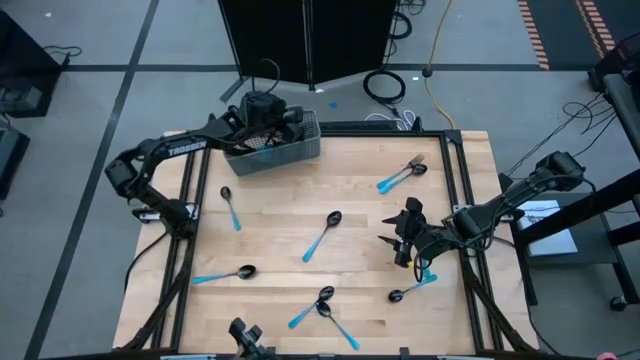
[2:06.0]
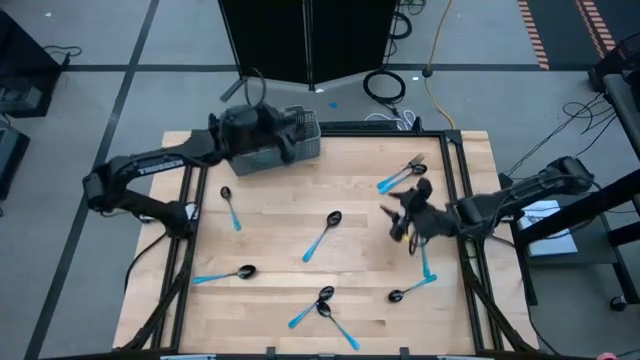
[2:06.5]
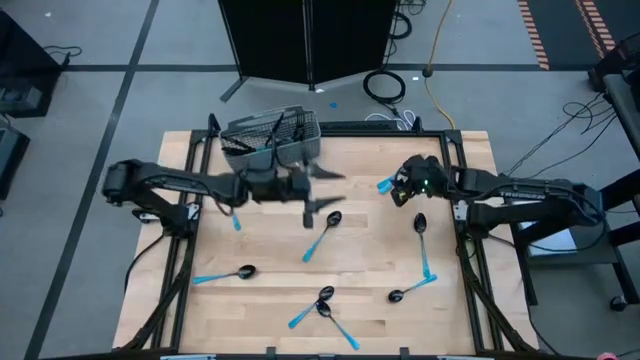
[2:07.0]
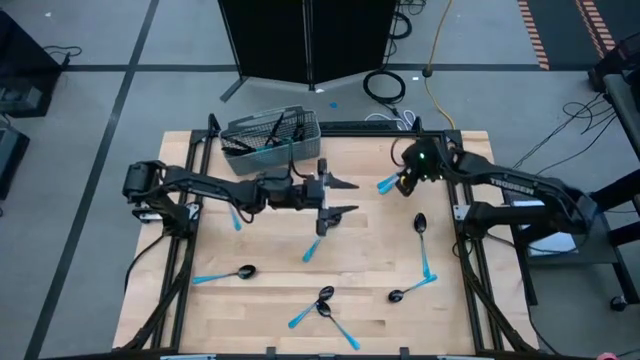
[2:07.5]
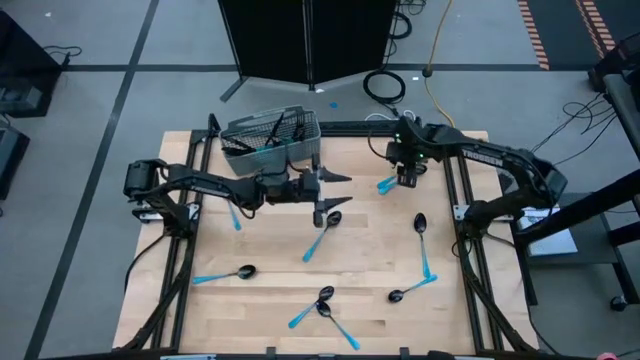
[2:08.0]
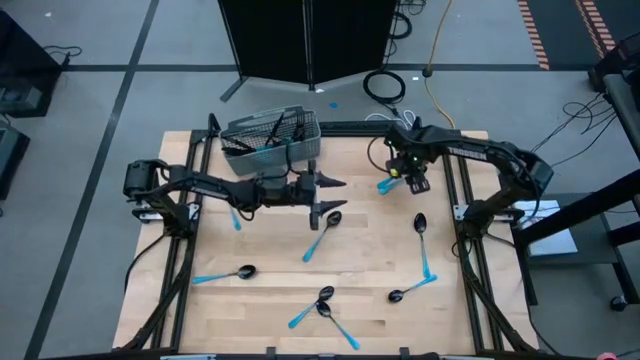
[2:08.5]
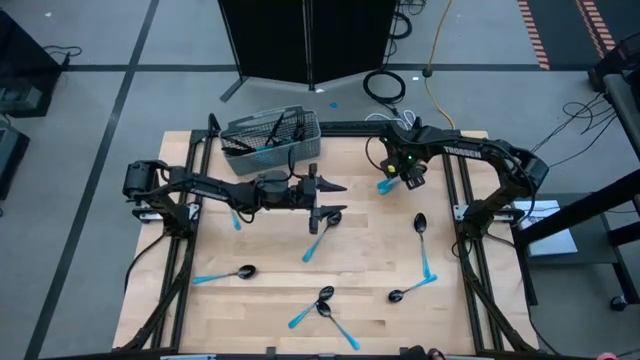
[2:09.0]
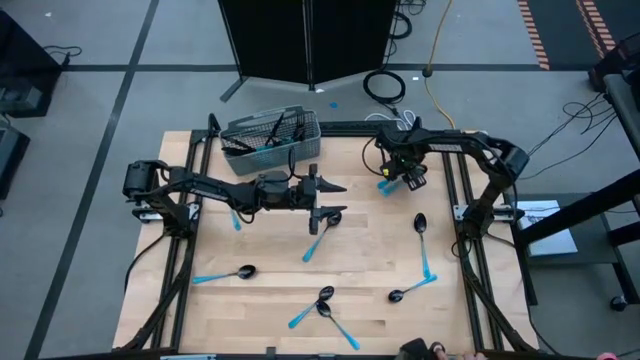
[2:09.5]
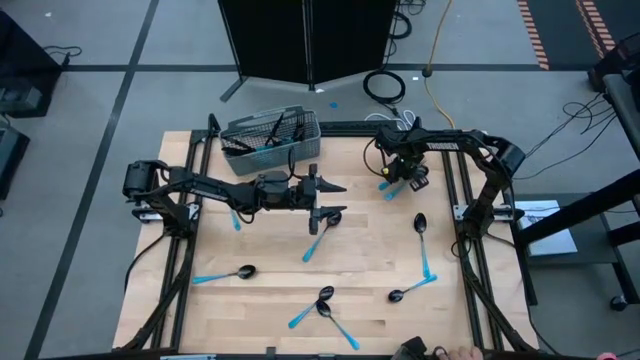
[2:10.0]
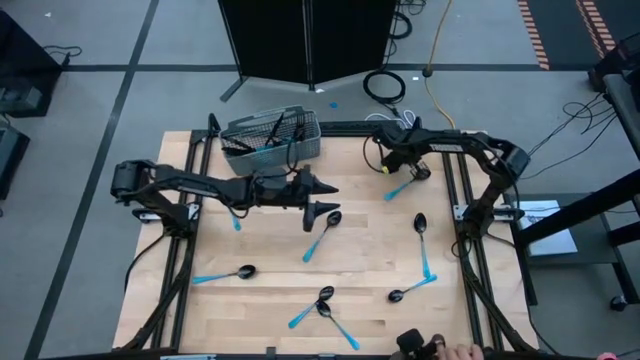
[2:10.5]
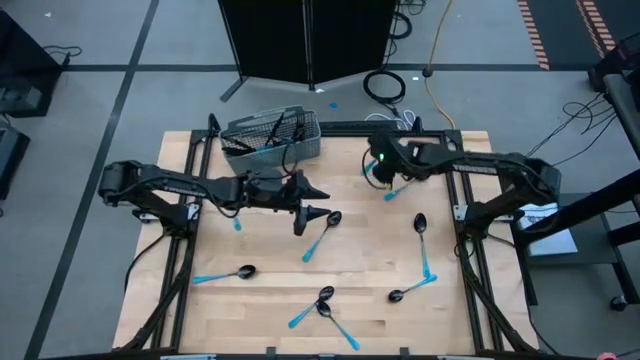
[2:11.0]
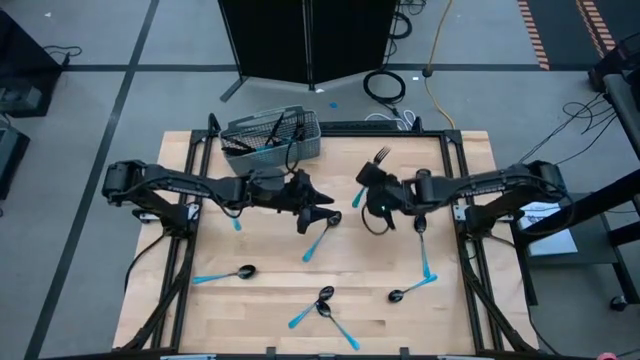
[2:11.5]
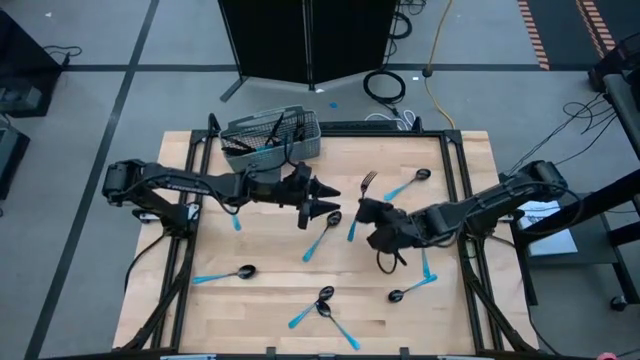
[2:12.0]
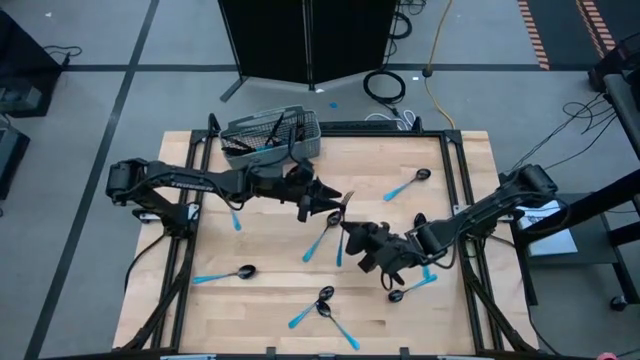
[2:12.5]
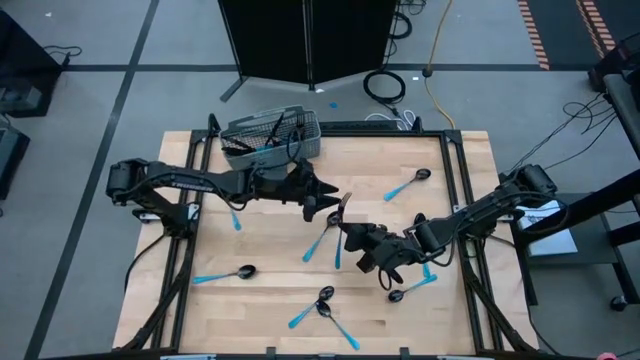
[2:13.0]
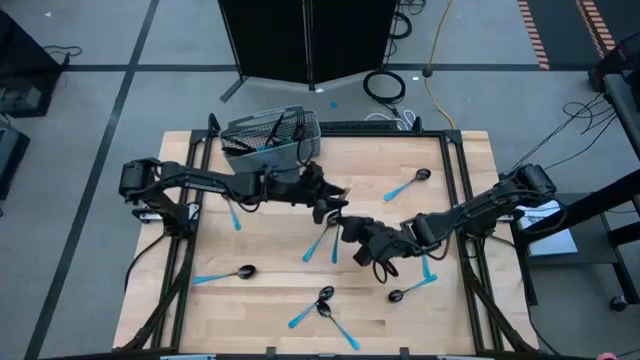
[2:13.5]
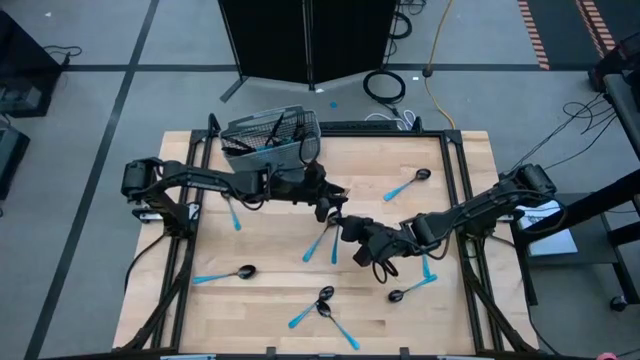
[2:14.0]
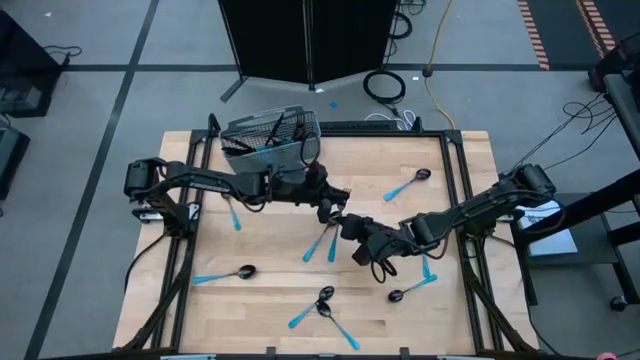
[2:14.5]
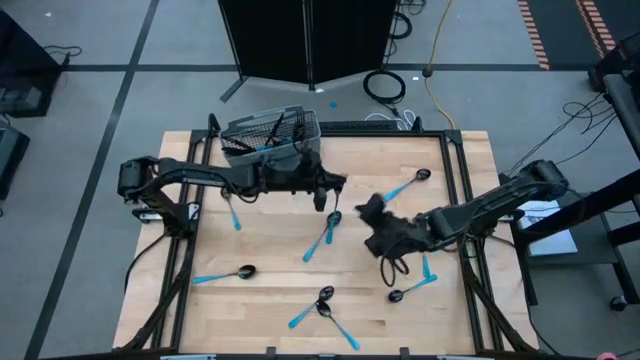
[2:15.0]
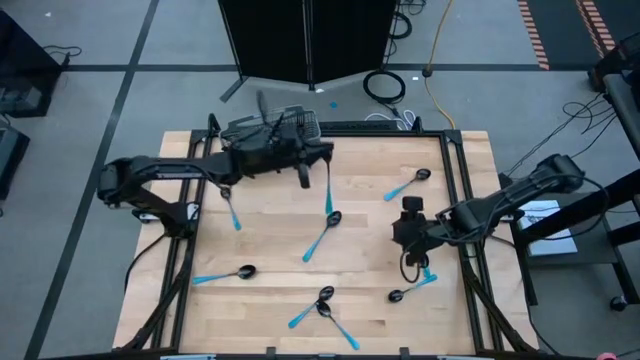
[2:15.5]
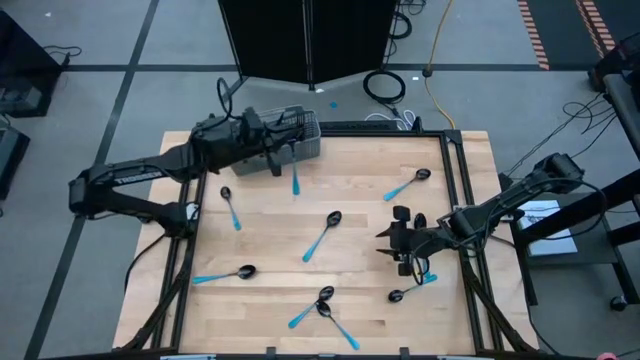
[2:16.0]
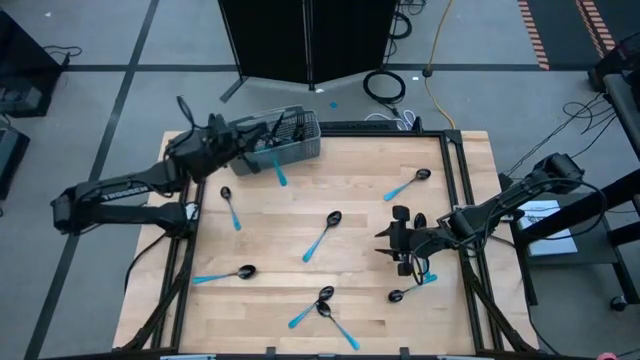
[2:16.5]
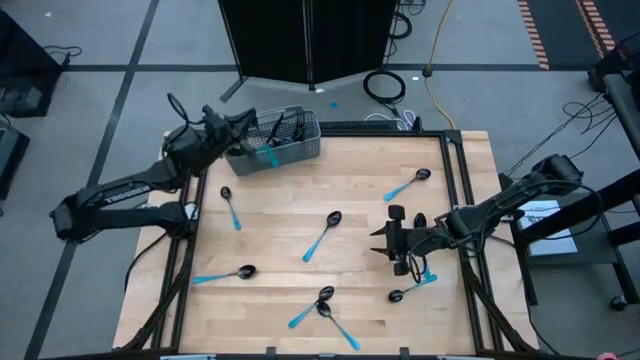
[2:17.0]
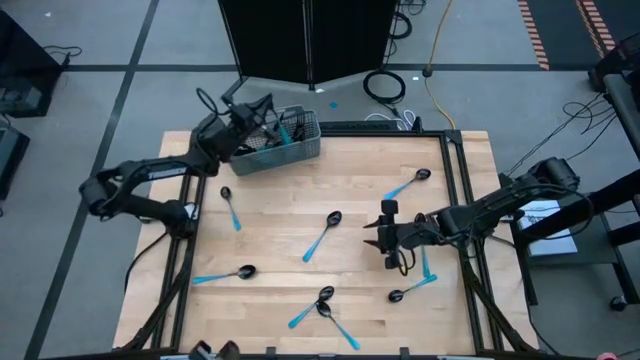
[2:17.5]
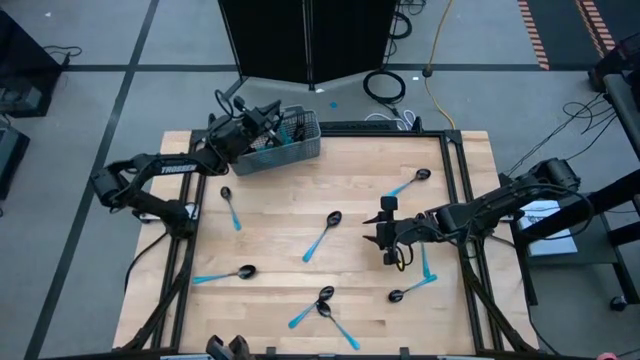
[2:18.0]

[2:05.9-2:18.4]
Task: Sort silverware
Put the blue fork into the silverware basket

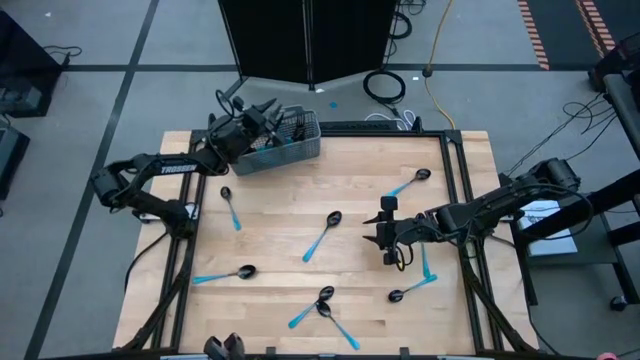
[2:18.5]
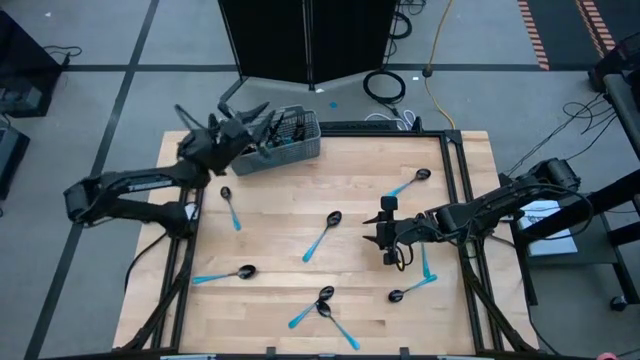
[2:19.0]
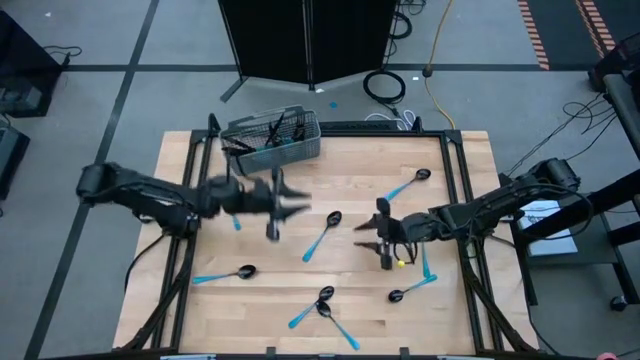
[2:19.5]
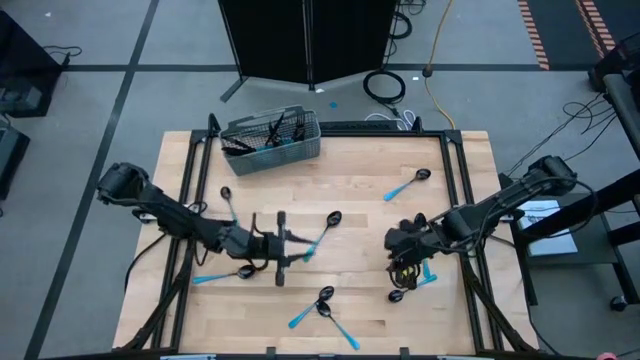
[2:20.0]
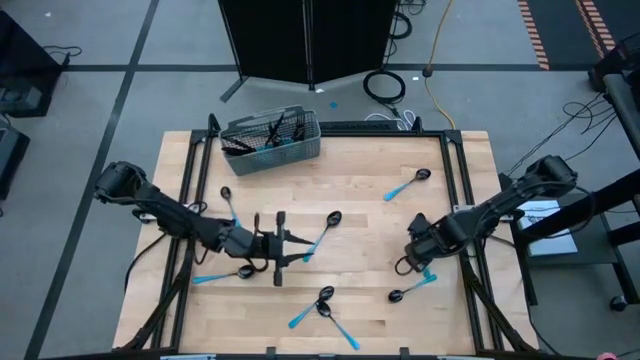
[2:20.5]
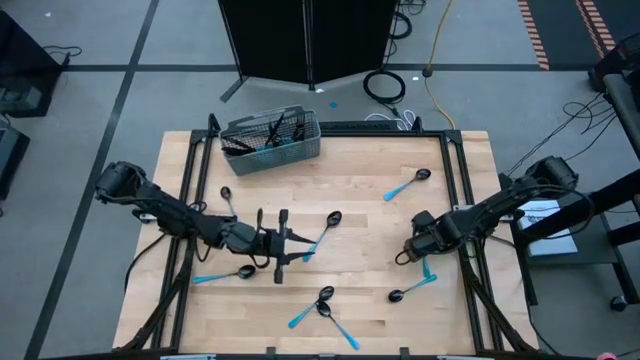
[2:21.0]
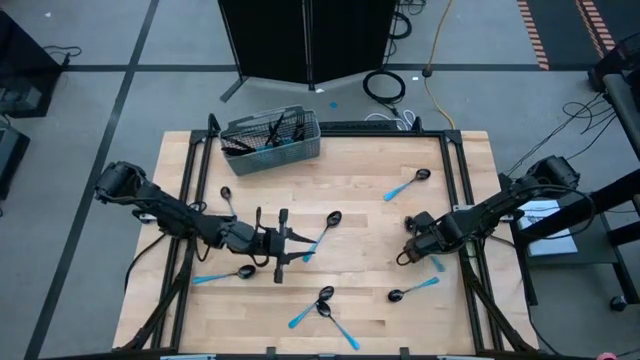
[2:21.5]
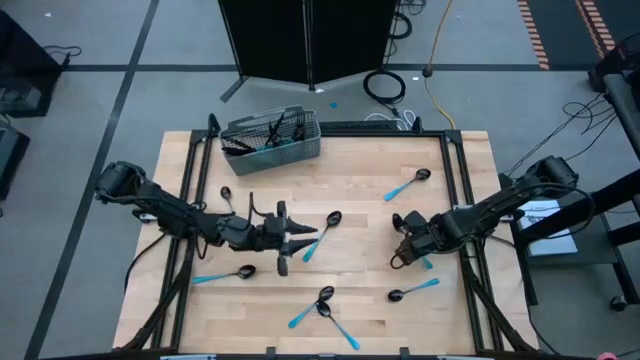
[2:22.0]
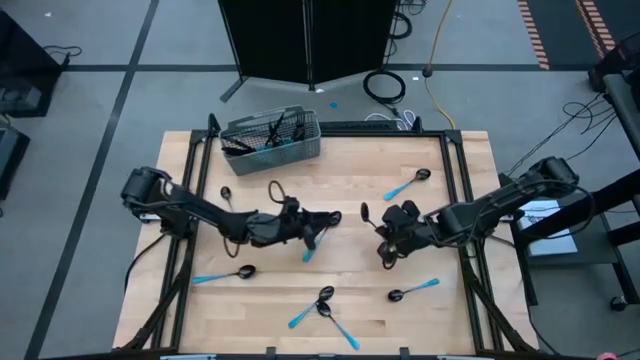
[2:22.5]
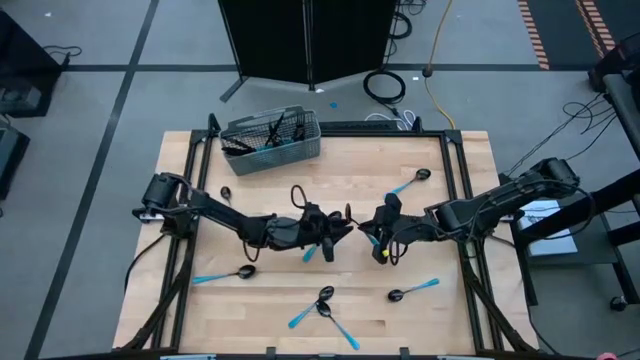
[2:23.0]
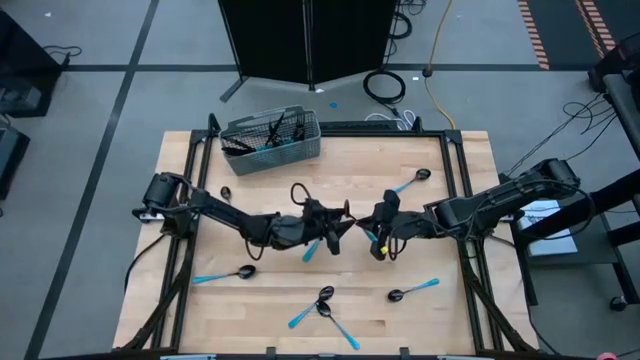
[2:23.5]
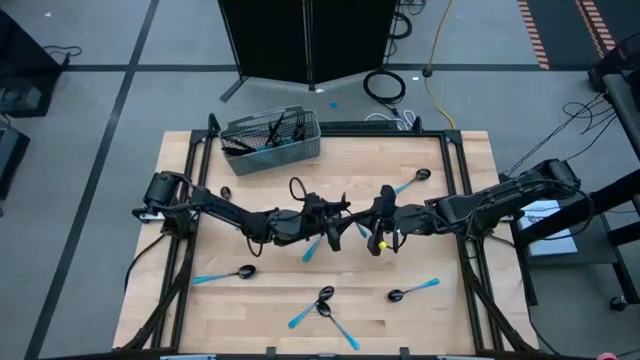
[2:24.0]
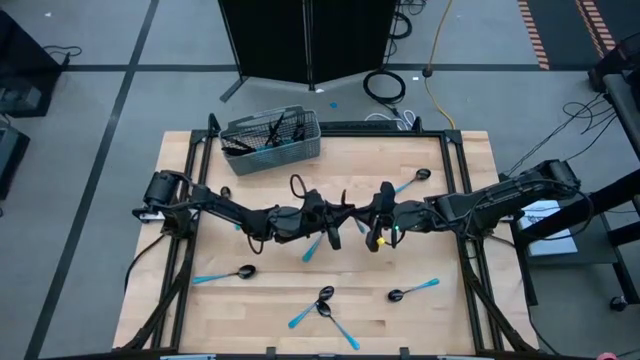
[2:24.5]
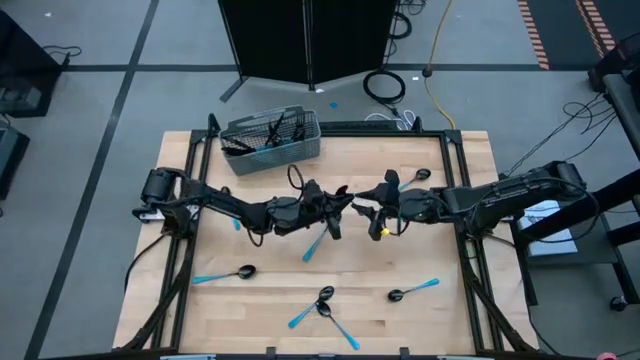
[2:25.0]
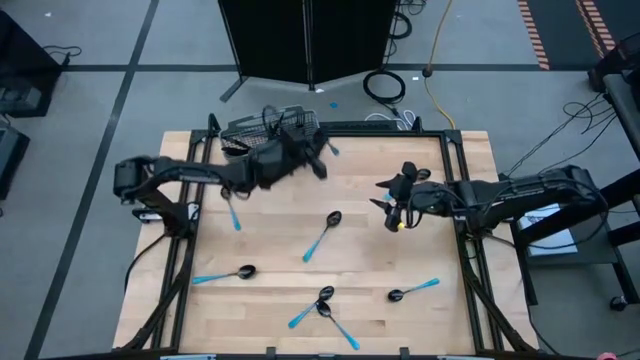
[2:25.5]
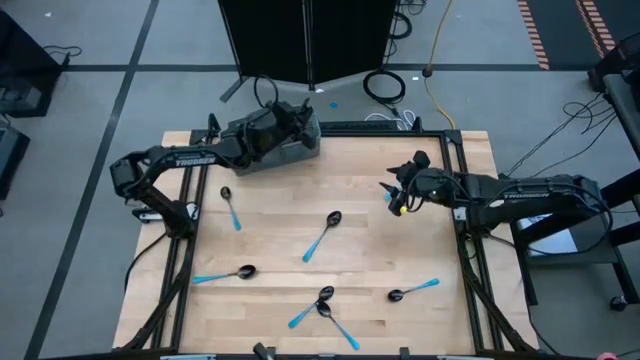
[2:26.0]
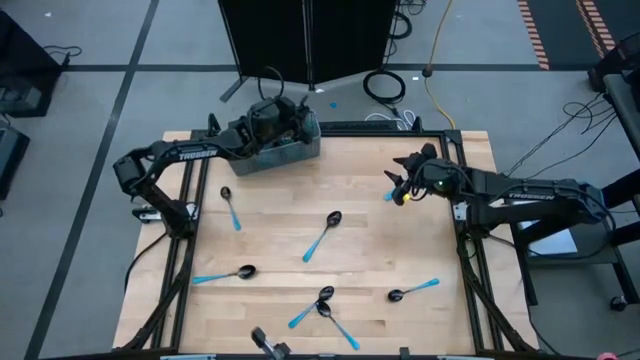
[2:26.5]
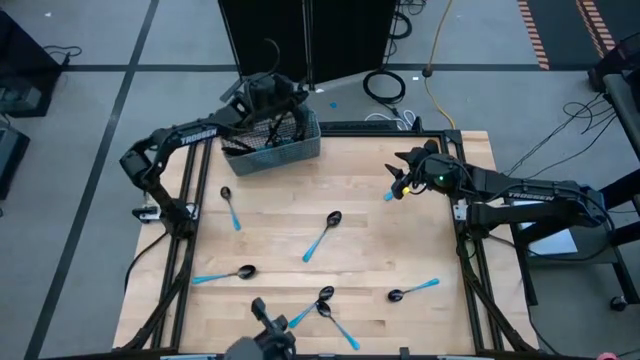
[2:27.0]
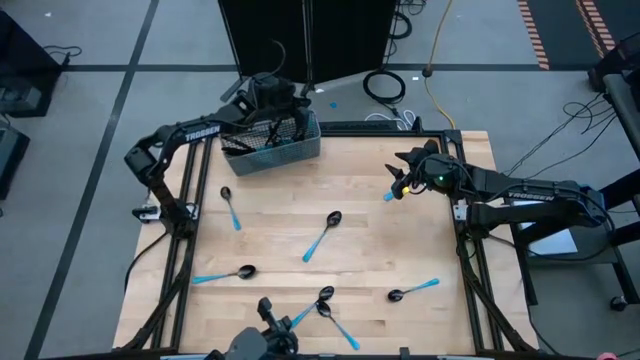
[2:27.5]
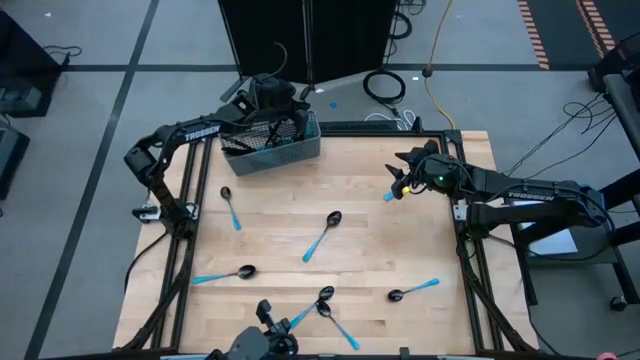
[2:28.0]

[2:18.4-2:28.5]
Put the blue spoon into the silverware basket
